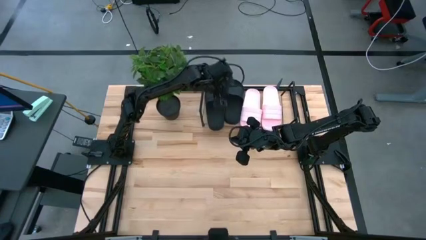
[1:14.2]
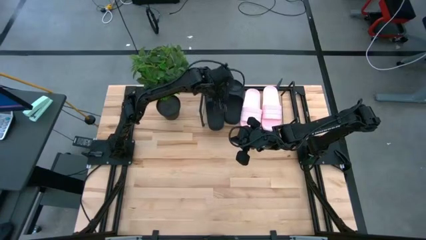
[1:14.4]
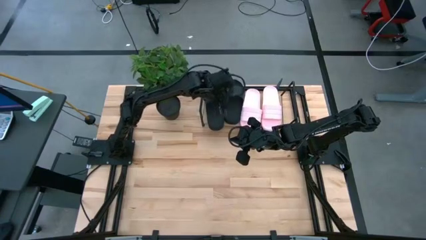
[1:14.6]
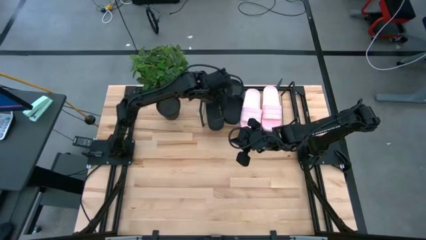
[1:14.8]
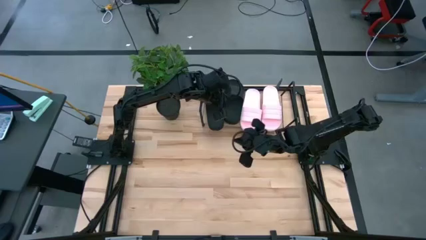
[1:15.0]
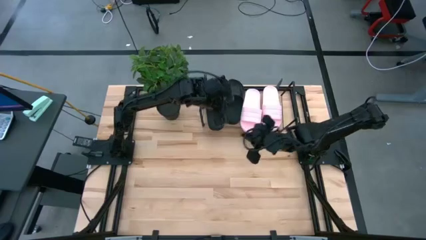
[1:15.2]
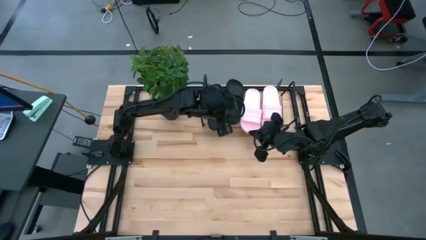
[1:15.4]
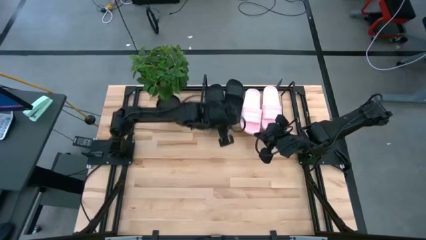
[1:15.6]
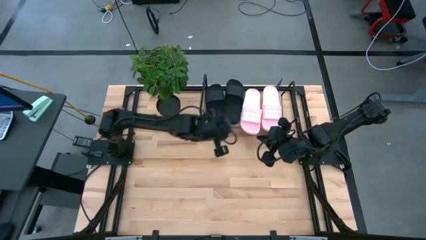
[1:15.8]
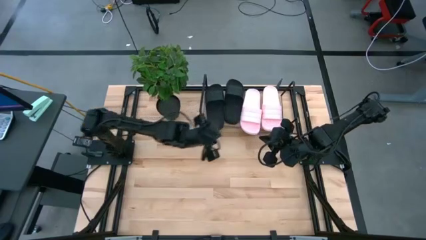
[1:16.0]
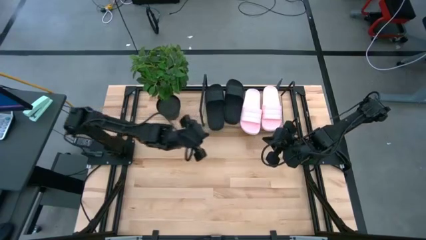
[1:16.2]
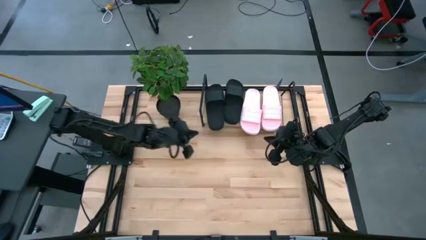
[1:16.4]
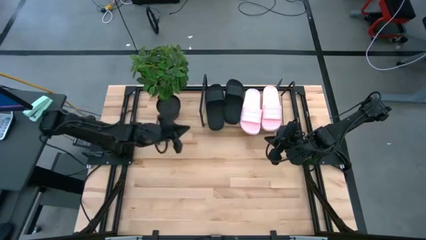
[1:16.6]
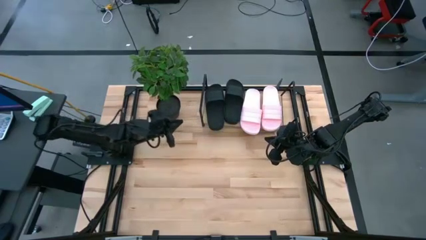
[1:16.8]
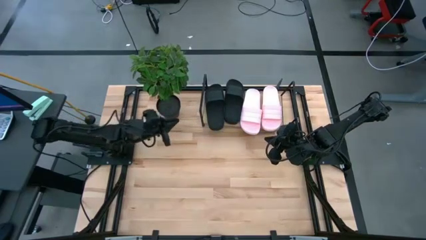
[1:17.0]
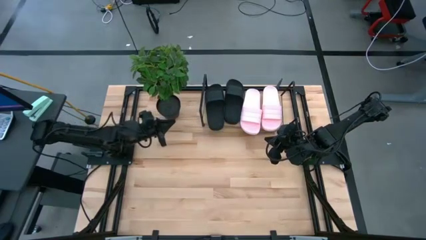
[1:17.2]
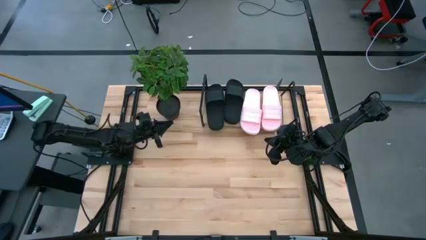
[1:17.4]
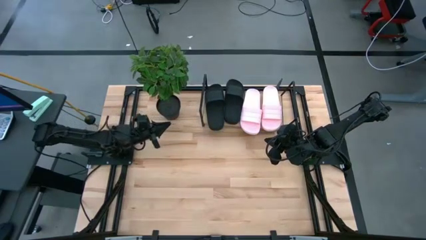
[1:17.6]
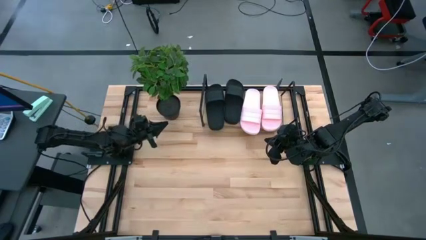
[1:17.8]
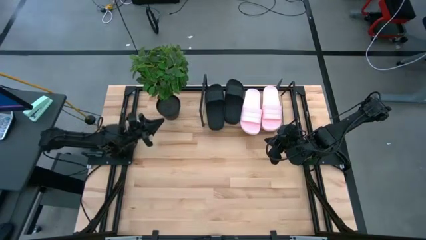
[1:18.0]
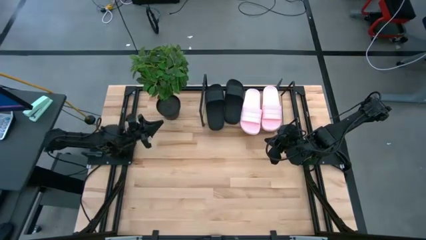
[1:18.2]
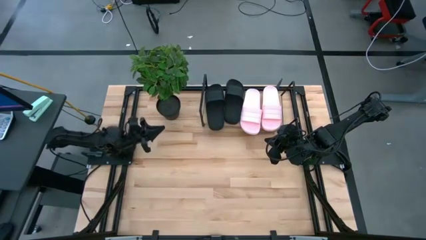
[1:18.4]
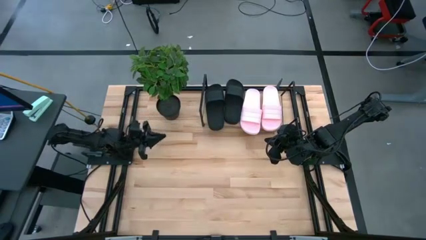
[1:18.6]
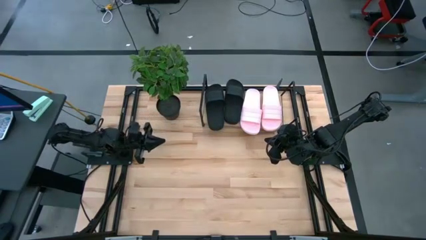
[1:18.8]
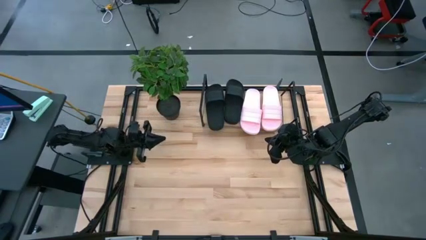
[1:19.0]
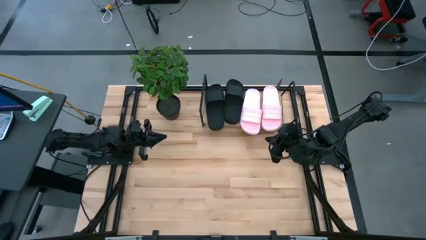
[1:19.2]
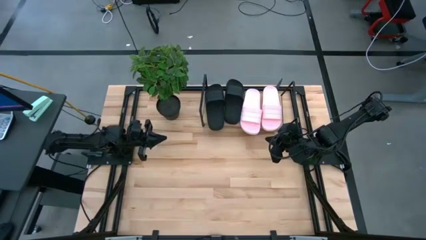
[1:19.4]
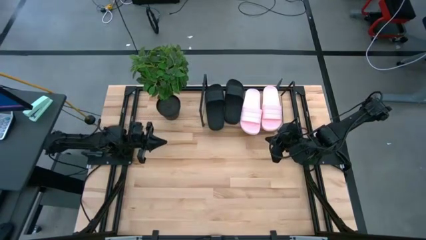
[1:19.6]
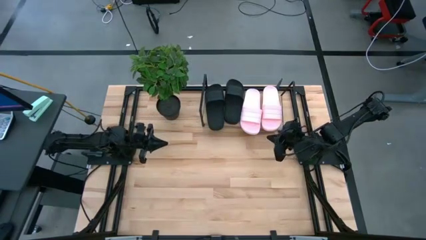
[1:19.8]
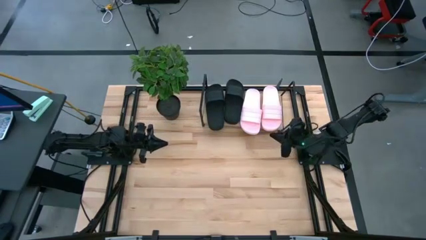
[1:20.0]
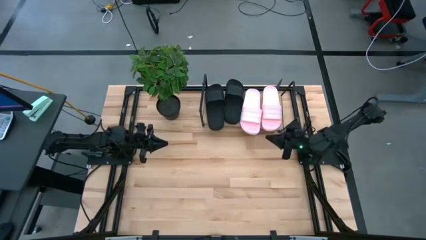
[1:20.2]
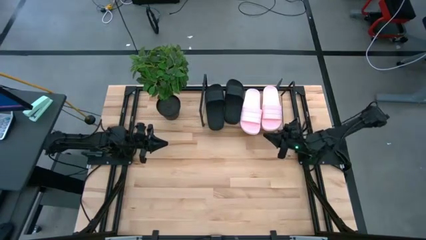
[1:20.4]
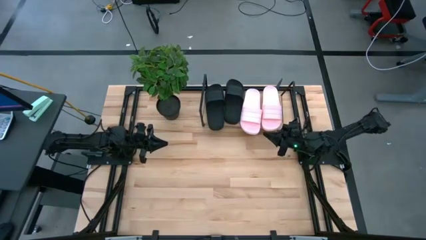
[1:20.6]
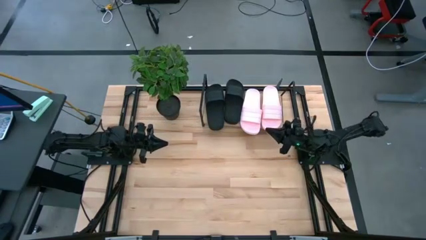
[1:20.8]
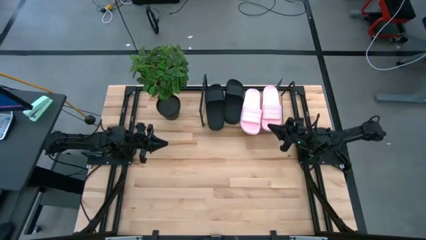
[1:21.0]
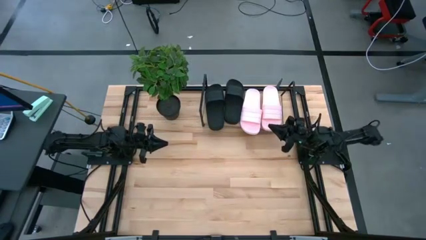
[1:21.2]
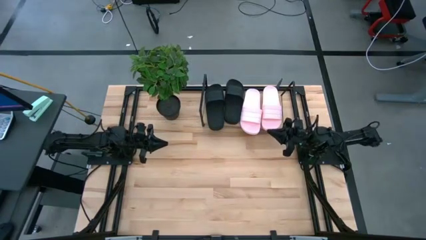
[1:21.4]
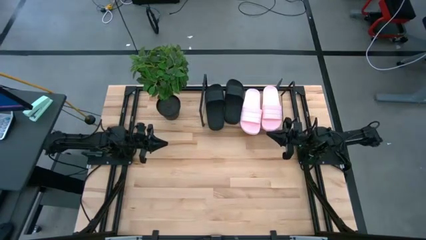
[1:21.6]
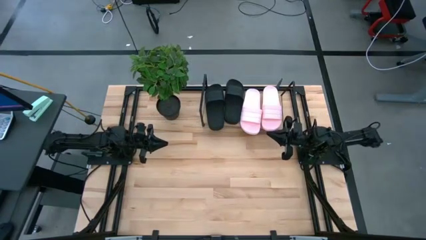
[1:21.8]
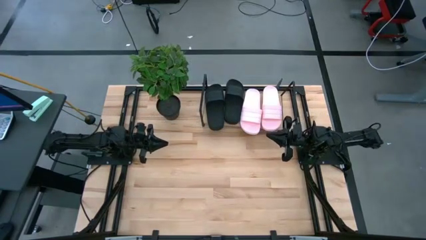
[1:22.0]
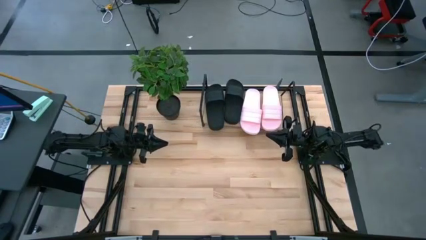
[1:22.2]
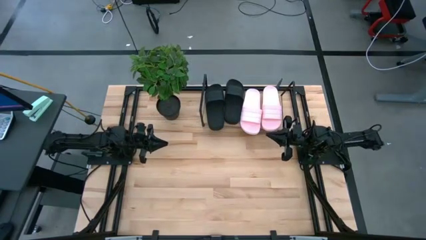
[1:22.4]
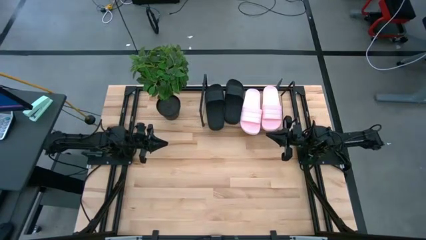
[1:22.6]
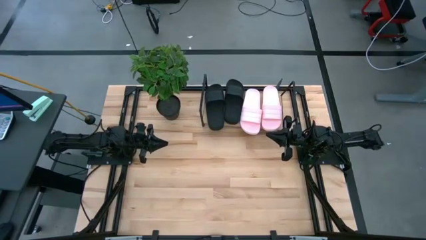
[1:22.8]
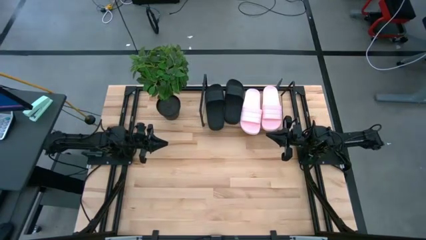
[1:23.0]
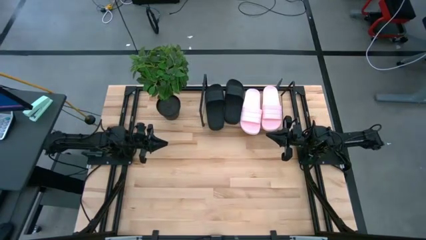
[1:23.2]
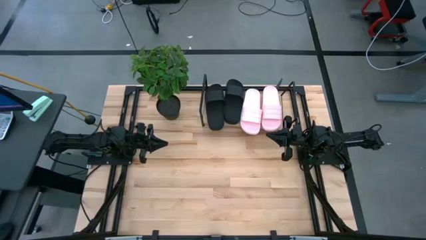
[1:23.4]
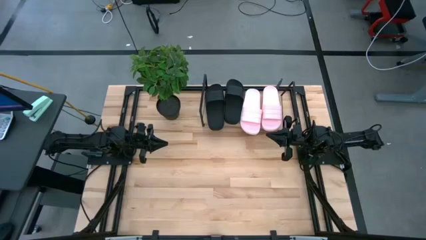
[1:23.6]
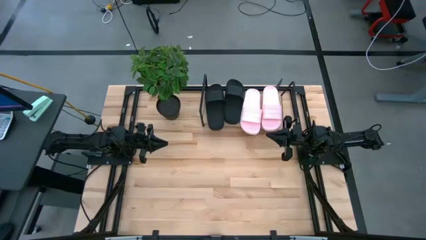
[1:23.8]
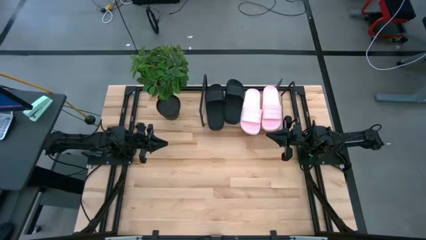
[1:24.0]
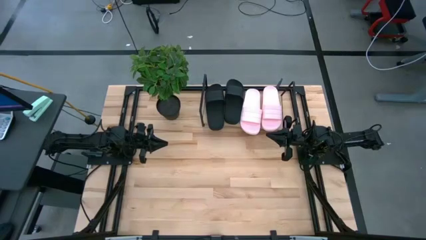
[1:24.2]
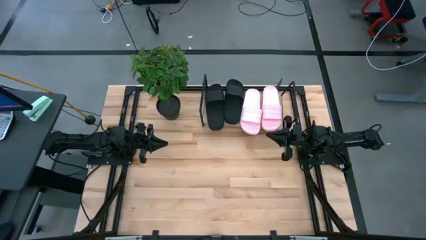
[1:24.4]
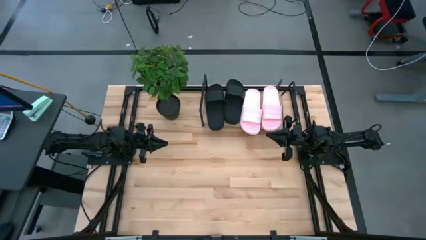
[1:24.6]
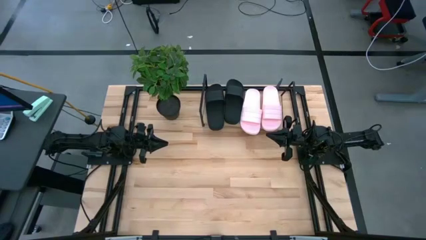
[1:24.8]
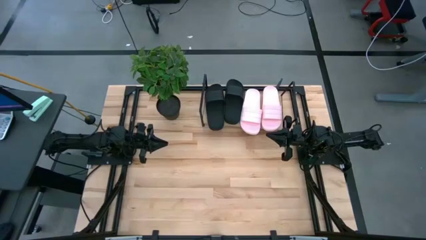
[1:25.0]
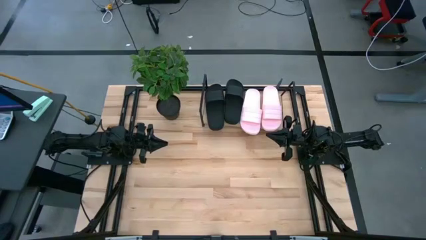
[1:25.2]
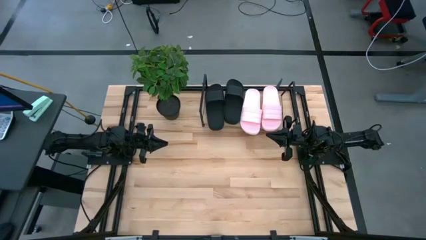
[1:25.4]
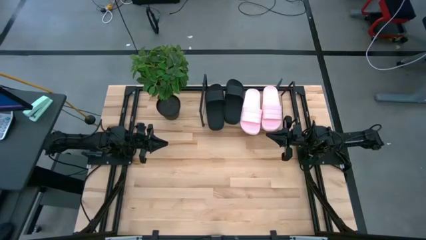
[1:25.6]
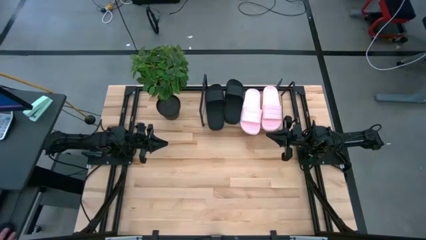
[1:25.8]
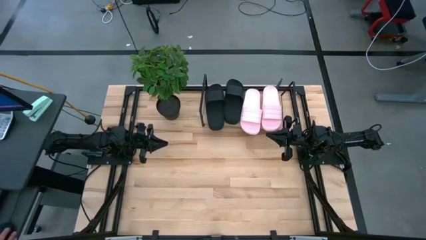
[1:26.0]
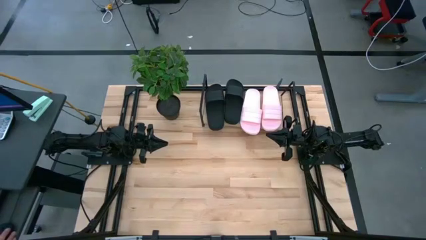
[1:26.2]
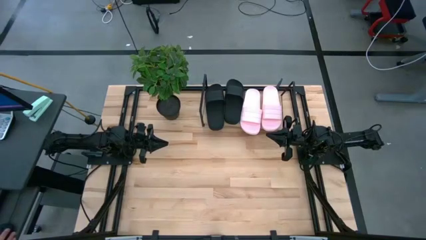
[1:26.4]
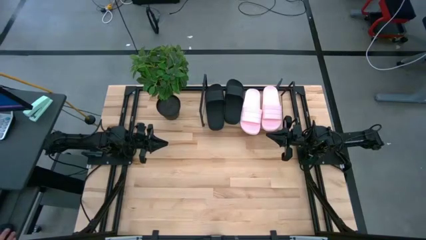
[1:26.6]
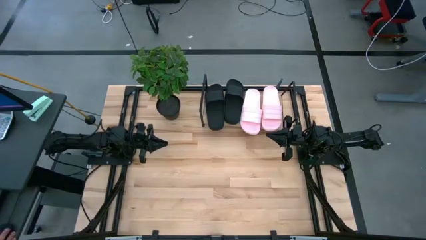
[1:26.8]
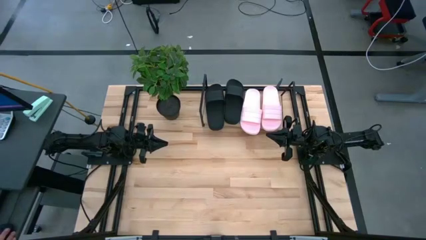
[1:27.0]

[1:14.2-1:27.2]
Task: Pick and place slides into the shelf
Return to Home Position

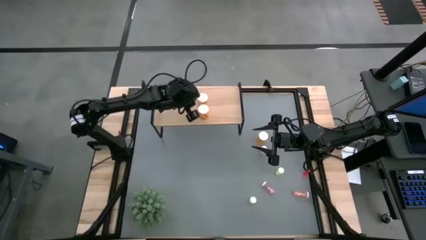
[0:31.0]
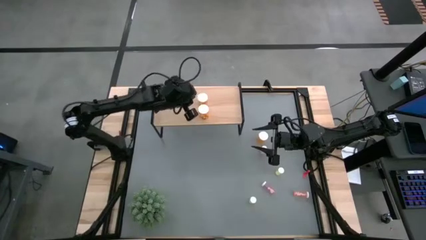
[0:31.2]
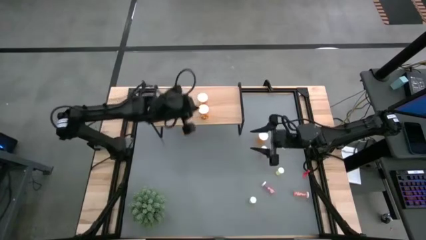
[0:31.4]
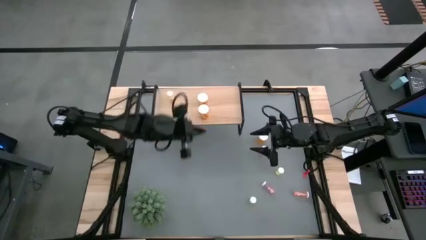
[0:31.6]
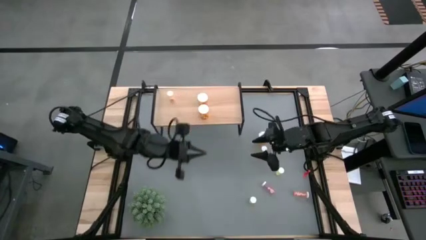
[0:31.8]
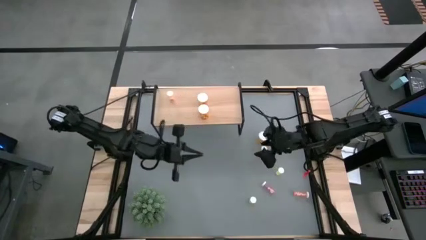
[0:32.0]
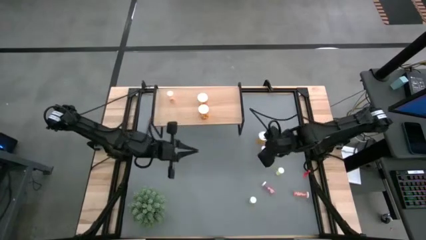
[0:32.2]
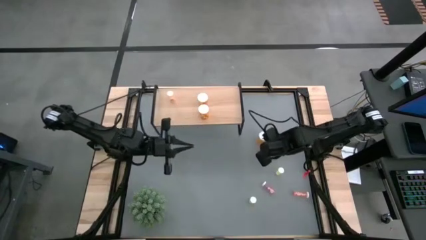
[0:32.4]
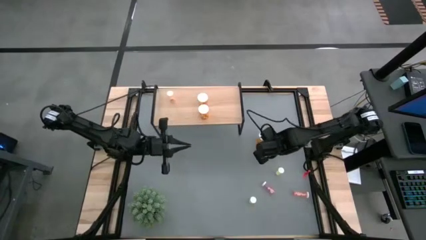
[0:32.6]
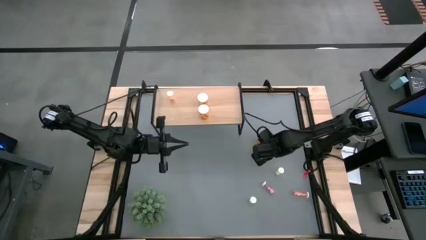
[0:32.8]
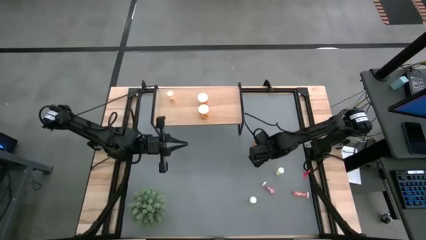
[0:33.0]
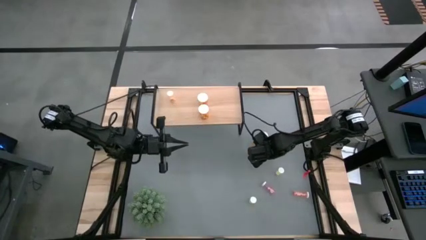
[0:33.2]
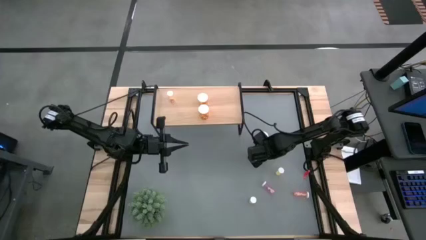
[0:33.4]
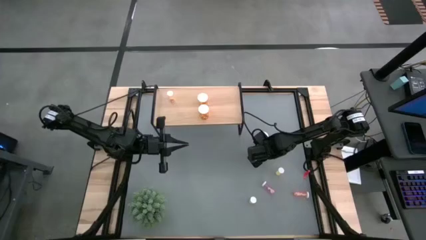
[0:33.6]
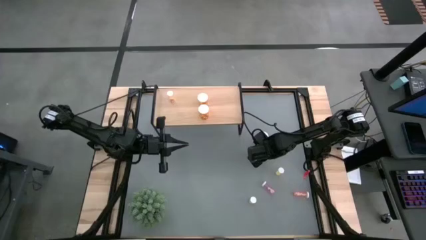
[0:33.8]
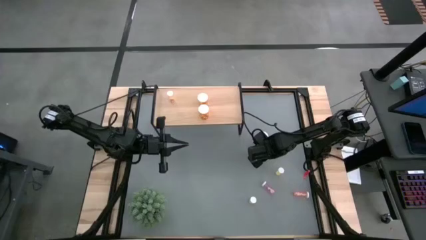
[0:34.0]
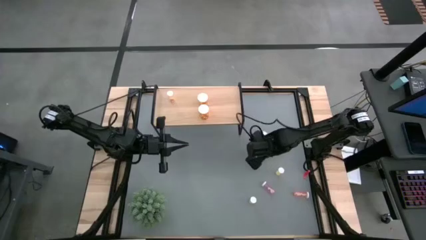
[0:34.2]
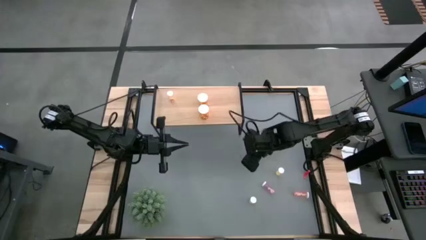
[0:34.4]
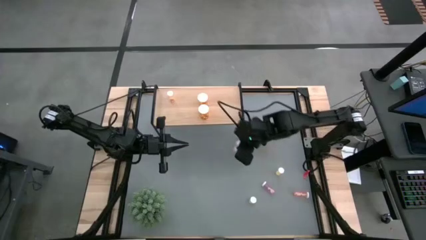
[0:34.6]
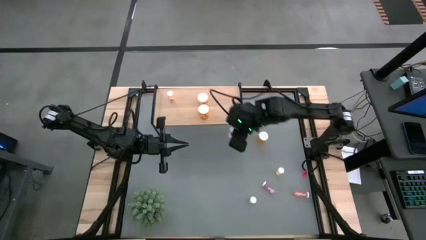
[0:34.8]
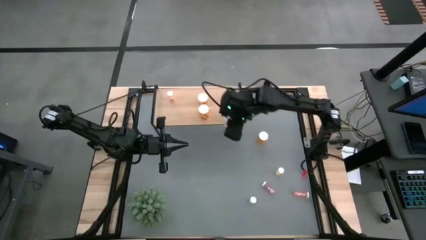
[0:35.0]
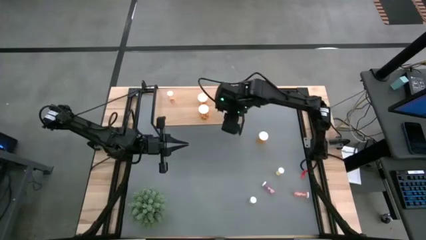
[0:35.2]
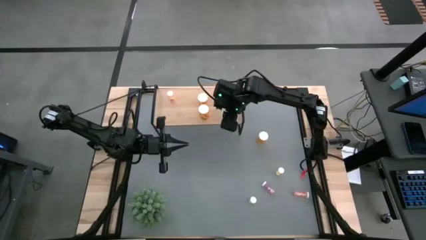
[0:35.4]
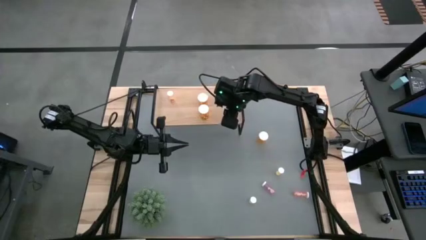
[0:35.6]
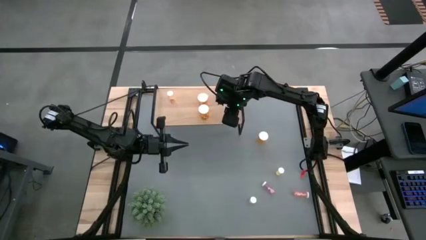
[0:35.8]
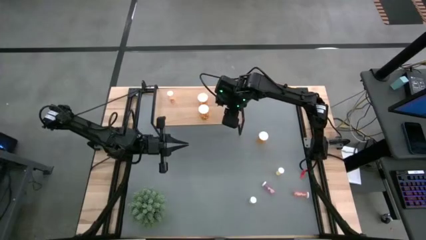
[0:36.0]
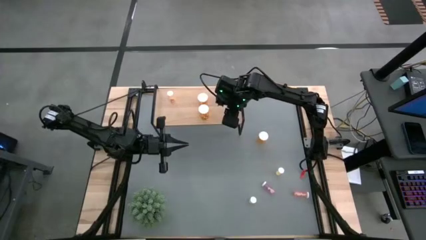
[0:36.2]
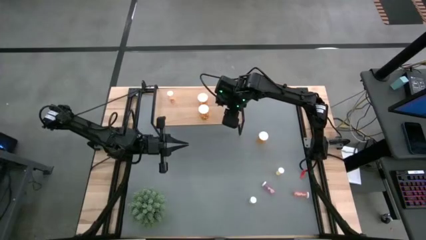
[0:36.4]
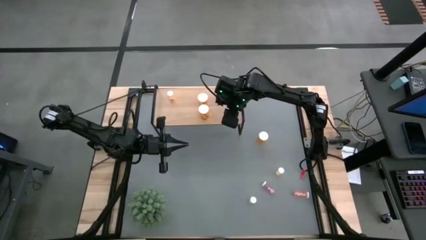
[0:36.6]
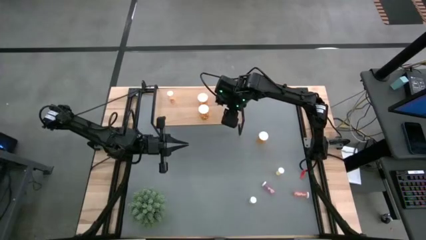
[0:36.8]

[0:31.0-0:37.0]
Task: Pick and place medicine bottles onto shelf by color
Put the top pink pill bottle on the shelf
